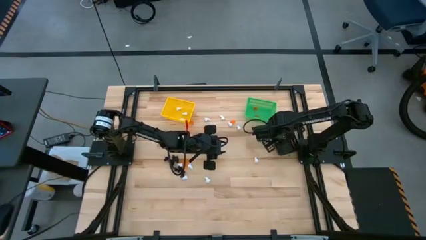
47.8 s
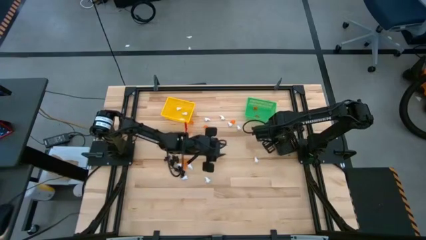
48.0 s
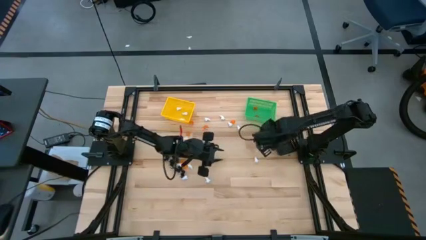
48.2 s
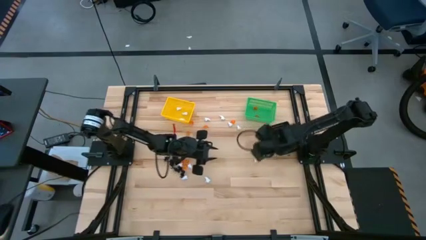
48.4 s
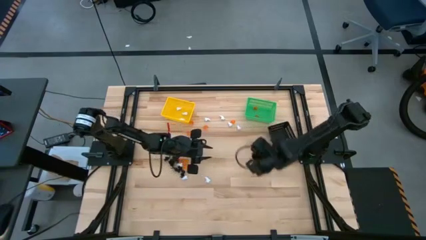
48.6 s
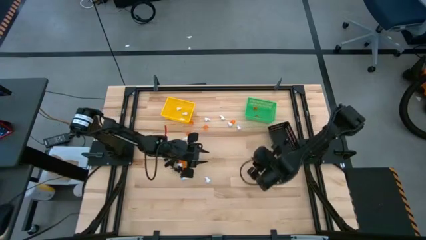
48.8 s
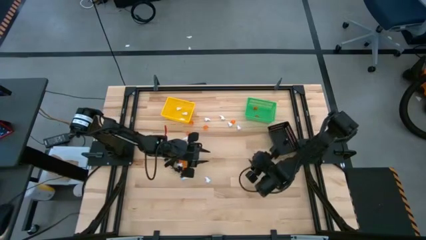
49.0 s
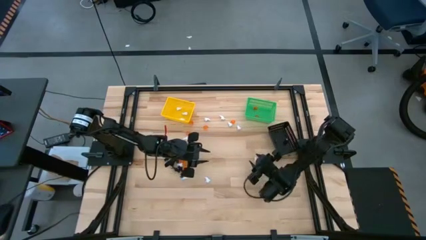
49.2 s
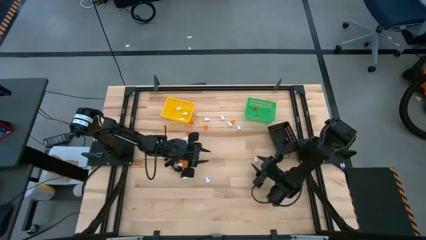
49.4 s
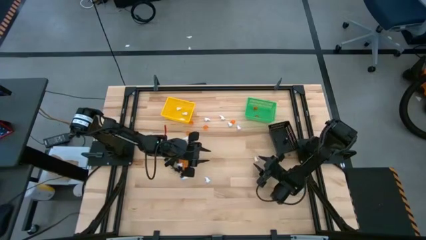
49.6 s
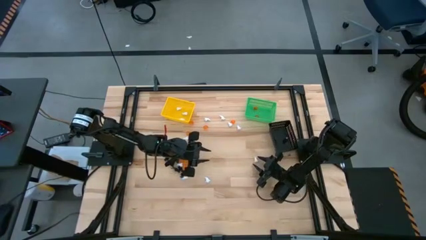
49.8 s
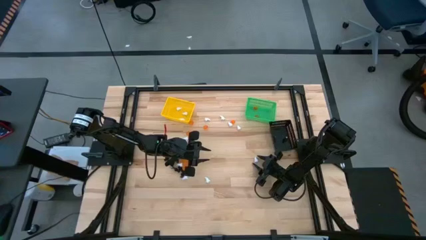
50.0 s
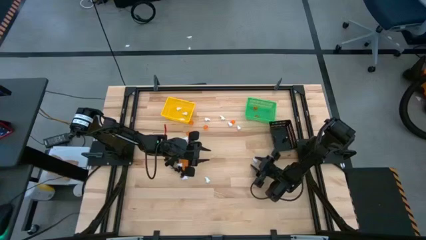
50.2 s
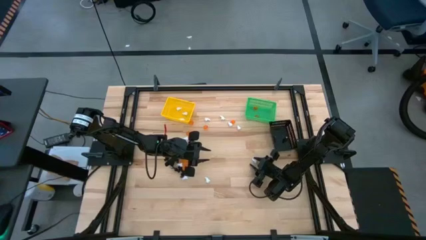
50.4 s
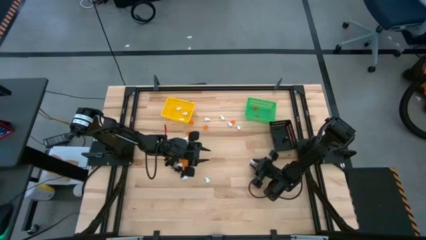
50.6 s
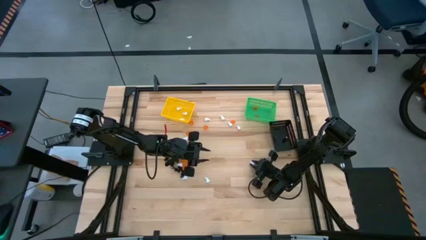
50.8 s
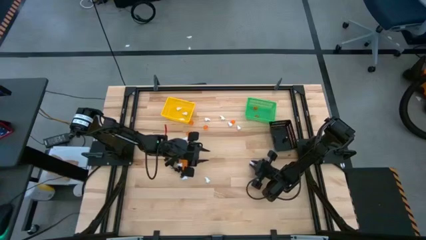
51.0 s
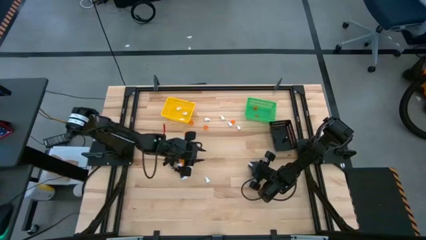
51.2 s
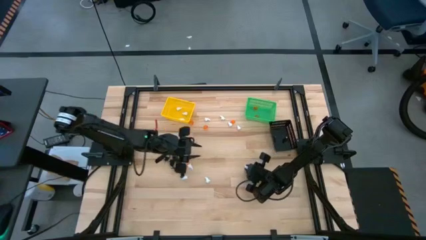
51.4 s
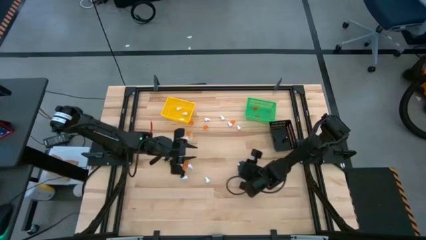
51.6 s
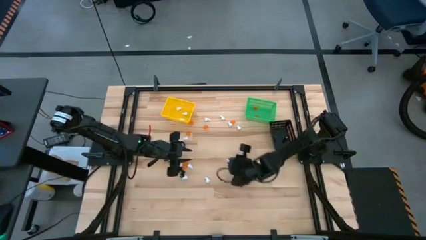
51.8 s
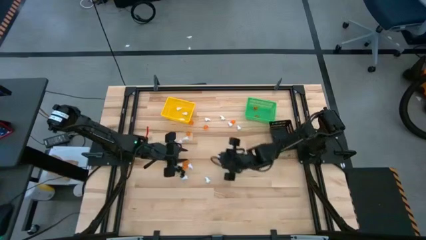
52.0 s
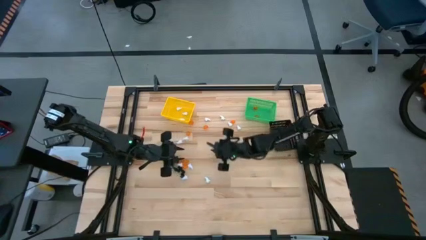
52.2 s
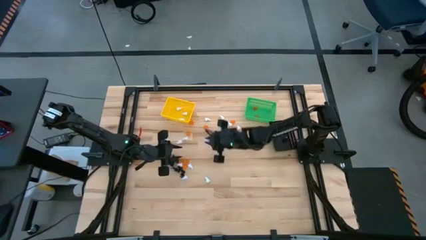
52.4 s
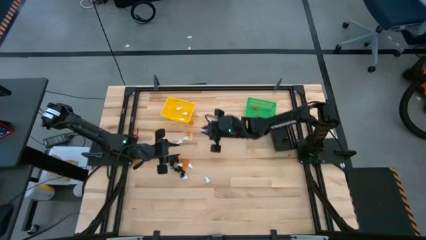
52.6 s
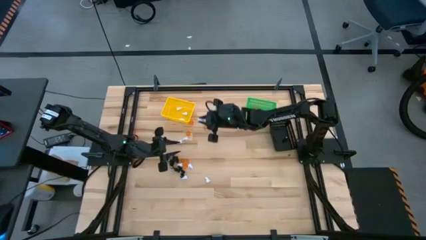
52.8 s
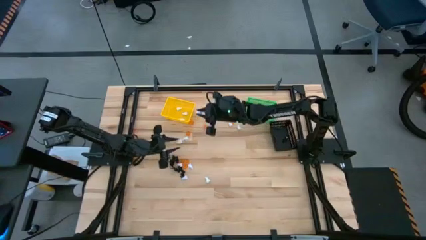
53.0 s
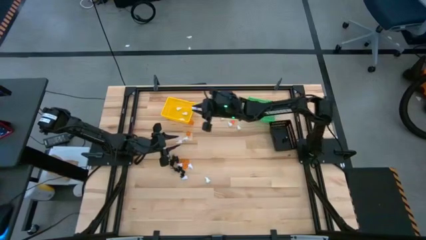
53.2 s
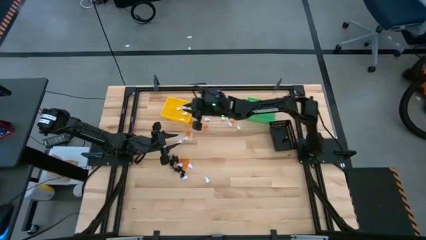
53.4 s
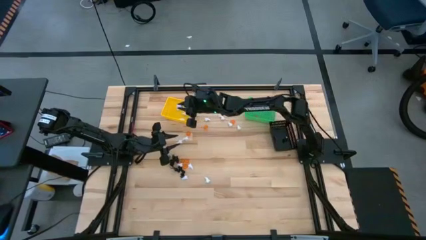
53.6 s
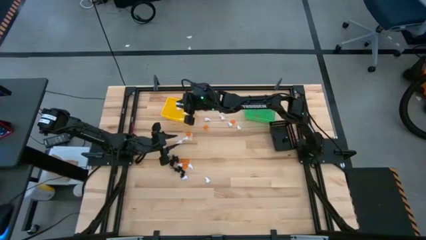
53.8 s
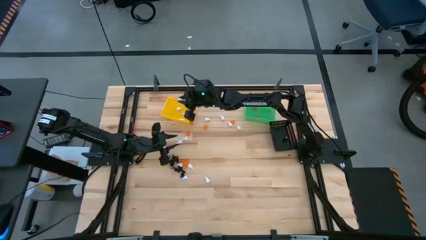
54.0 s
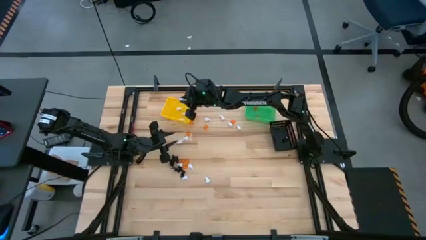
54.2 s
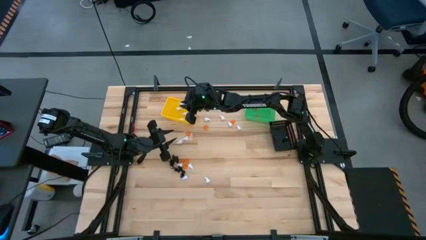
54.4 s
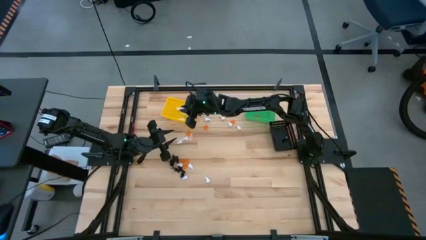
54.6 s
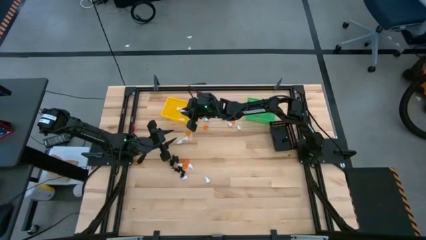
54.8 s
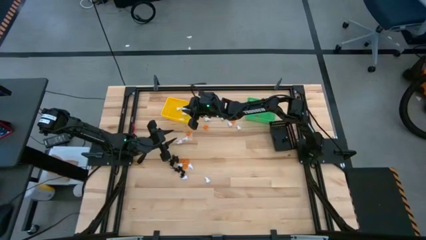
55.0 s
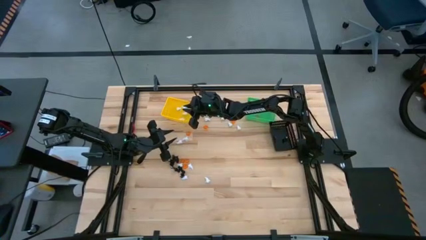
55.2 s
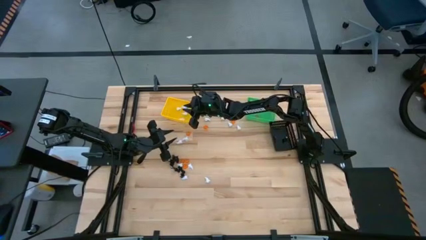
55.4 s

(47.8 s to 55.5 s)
Task: Sort Halloween decoration
Put the white ghost toy into the yellow bin

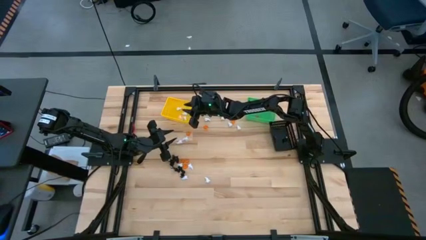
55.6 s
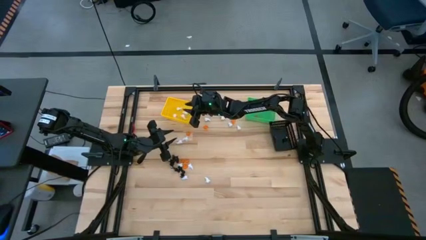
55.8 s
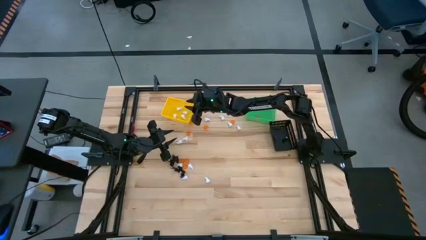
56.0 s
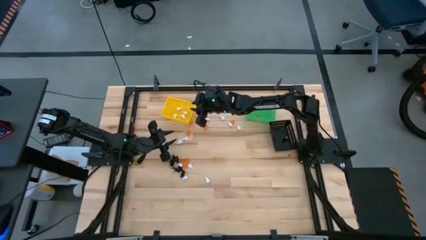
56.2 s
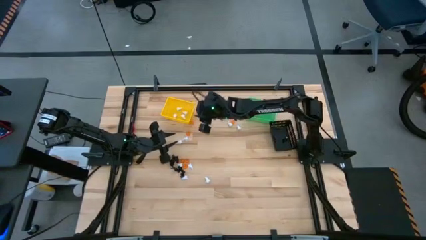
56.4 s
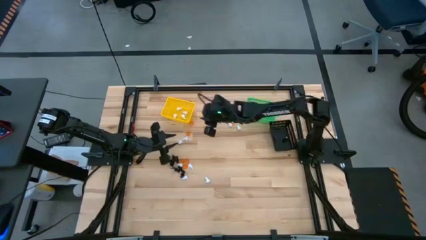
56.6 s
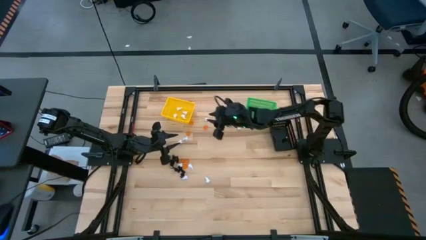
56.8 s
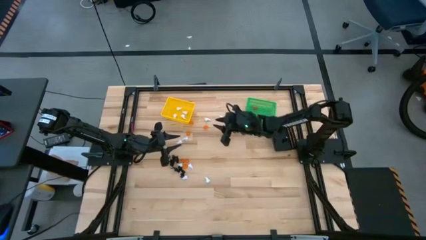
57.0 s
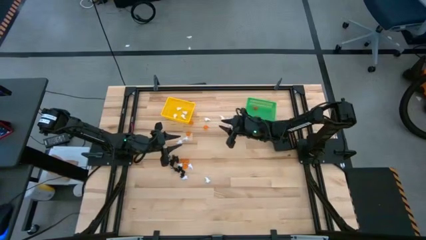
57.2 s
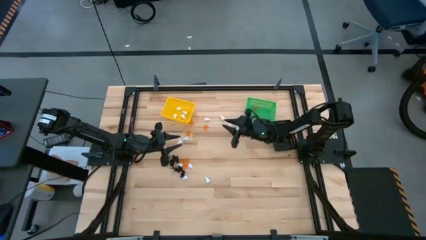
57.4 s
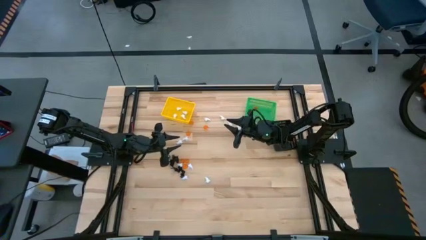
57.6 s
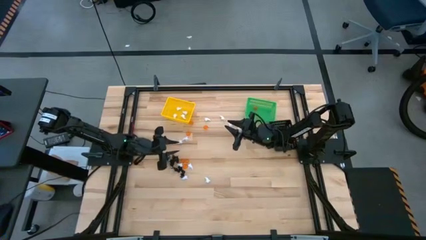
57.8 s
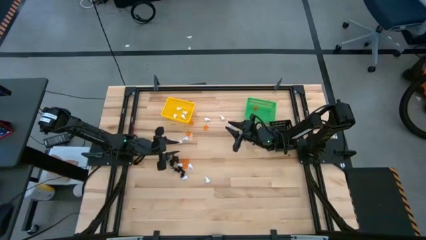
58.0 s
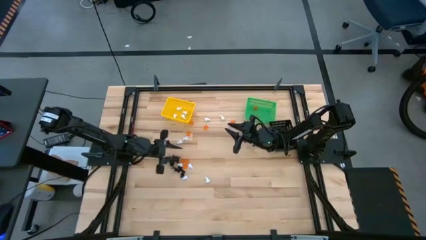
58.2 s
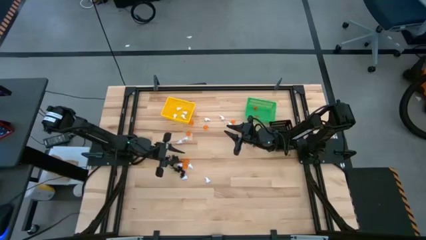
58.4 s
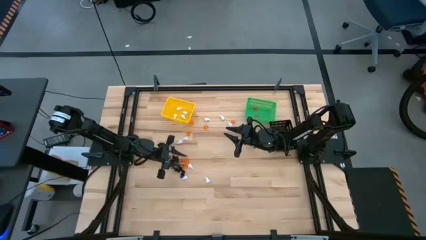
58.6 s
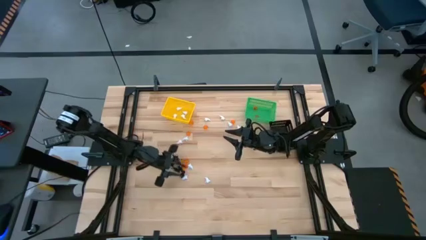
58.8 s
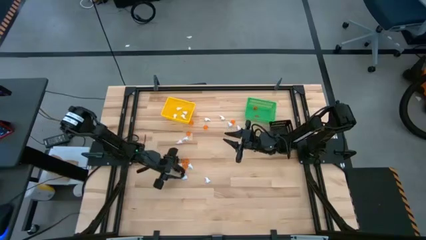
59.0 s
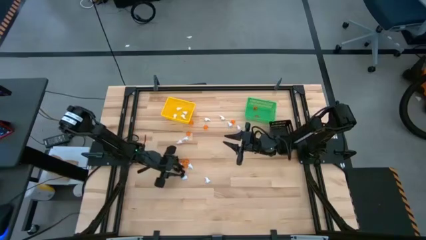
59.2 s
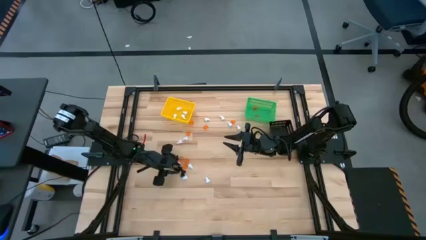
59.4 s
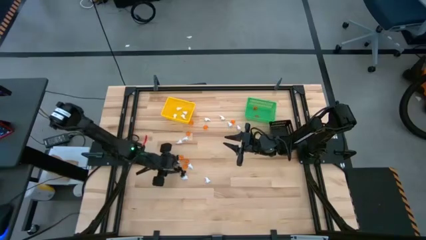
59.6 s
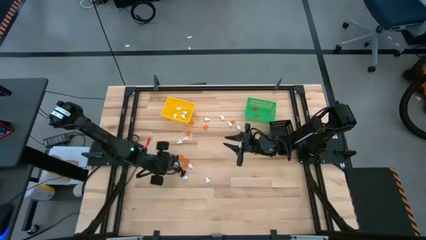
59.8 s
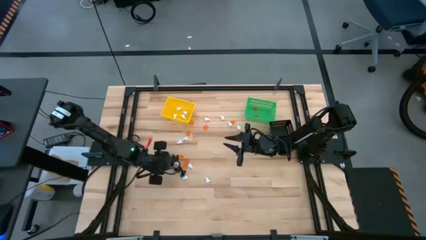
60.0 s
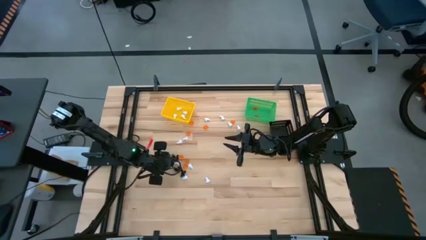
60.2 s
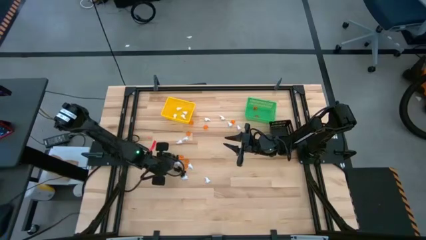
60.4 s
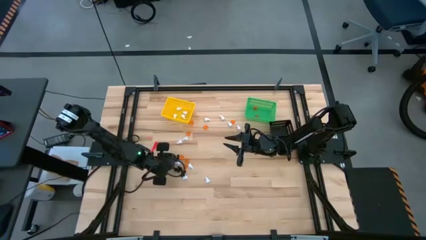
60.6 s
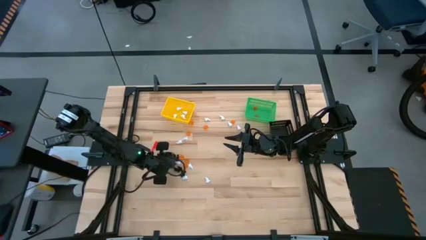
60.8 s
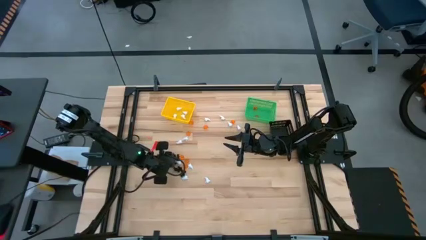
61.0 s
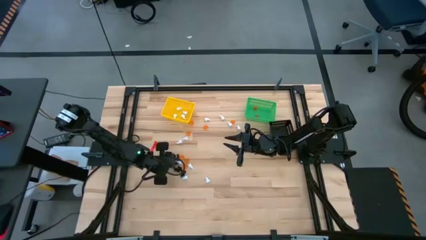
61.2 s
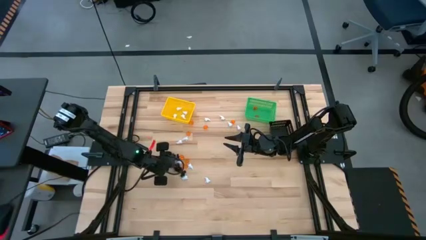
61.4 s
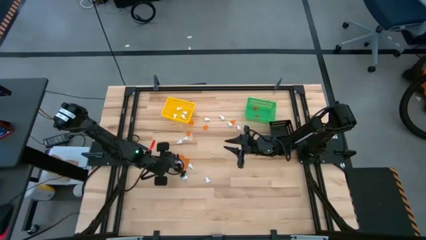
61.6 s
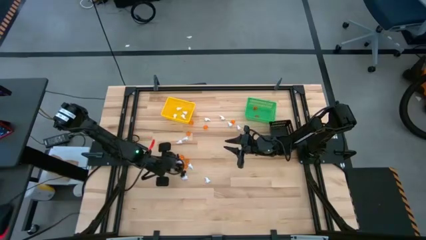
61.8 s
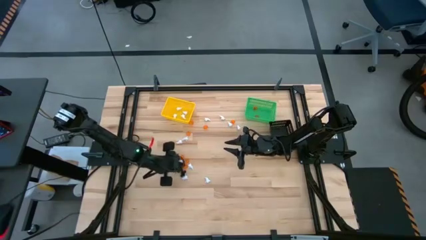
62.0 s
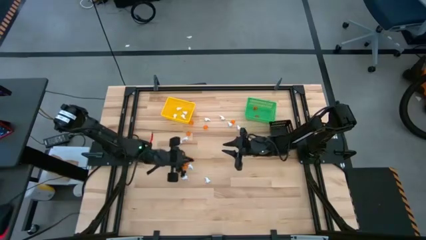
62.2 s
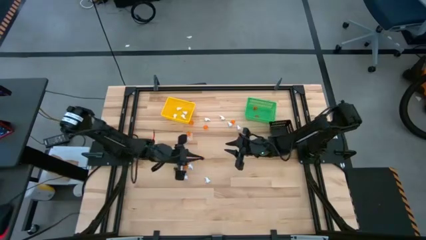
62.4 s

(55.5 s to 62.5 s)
Put the black skeleton toy into the black bin

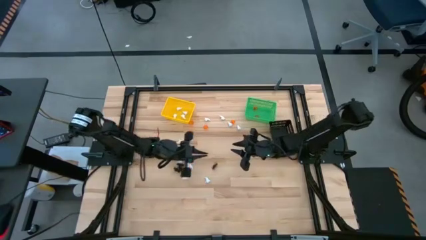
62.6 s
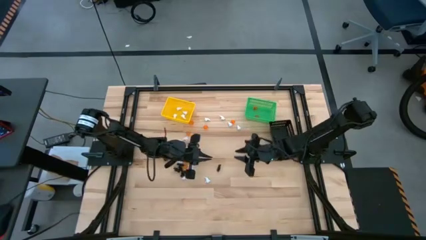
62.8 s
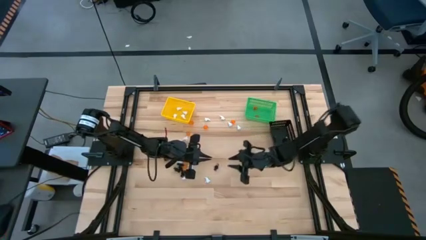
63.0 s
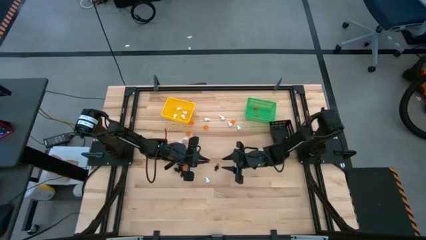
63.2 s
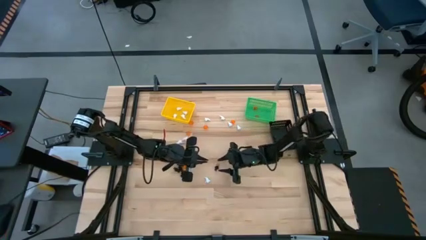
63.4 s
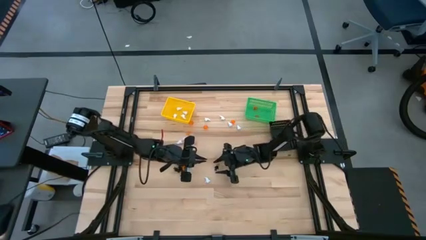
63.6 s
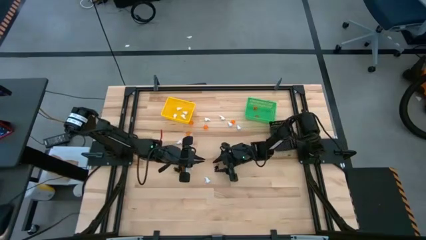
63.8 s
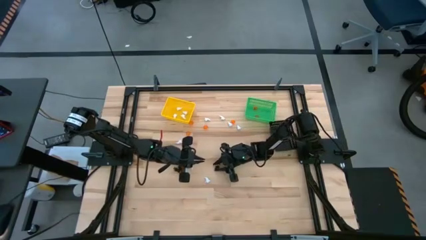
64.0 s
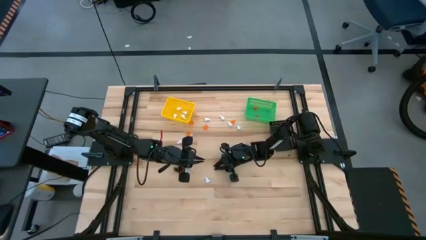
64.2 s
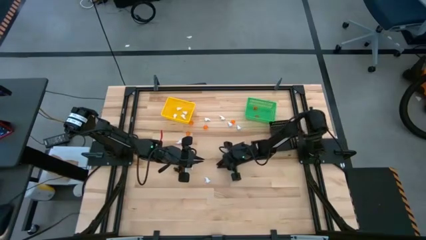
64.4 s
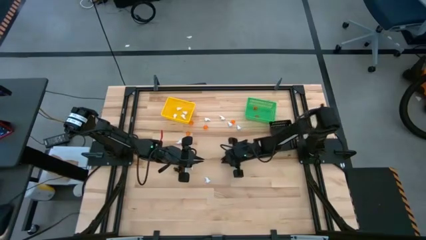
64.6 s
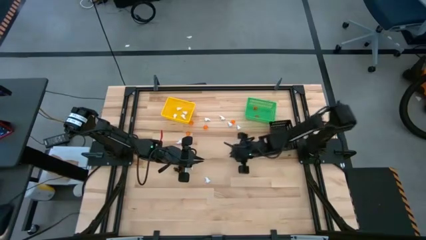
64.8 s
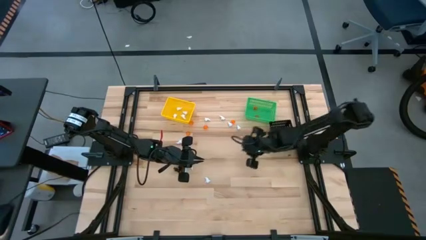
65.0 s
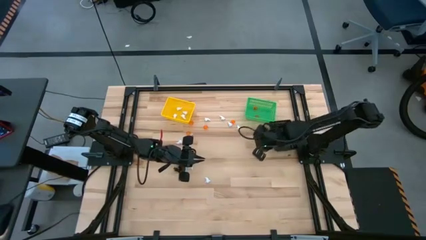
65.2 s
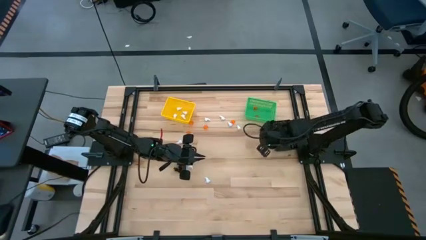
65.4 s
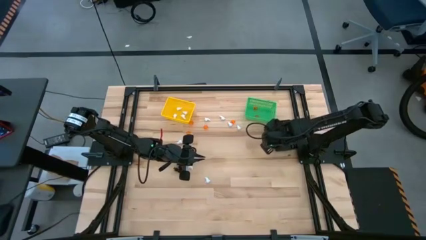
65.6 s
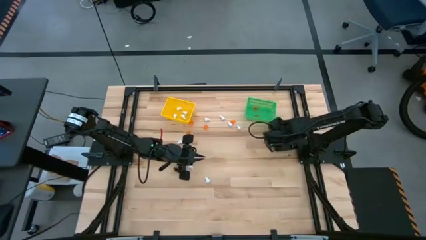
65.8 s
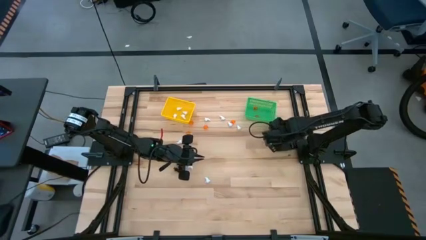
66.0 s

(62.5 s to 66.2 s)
Put the black skeleton toy into the black bin
